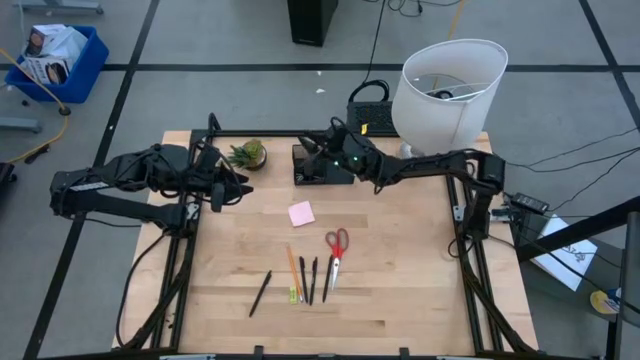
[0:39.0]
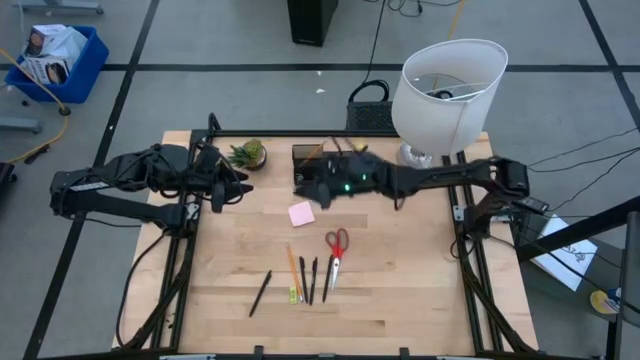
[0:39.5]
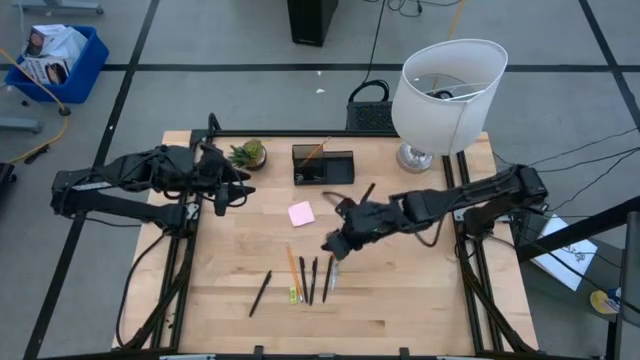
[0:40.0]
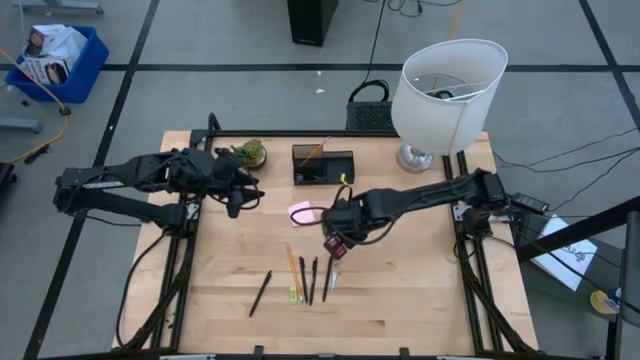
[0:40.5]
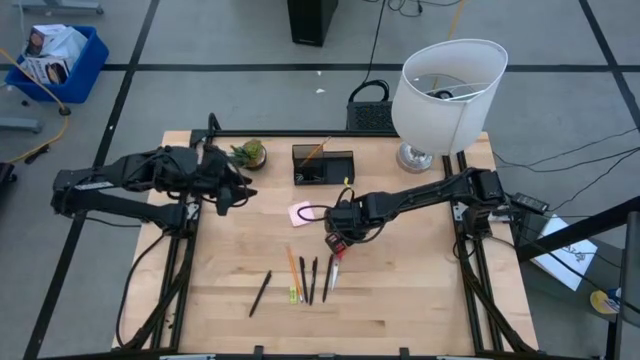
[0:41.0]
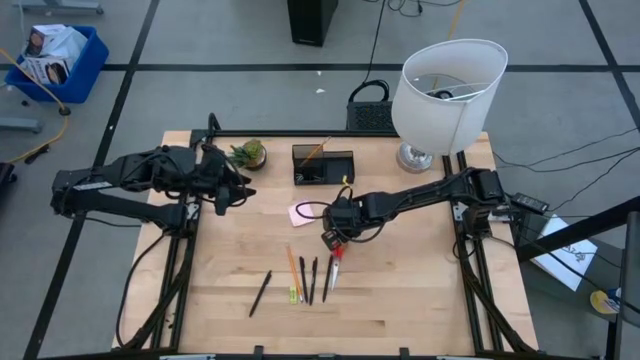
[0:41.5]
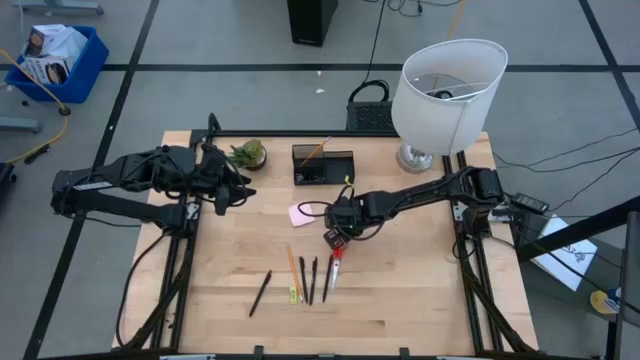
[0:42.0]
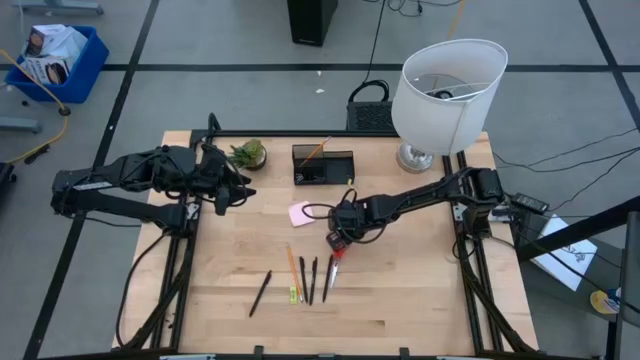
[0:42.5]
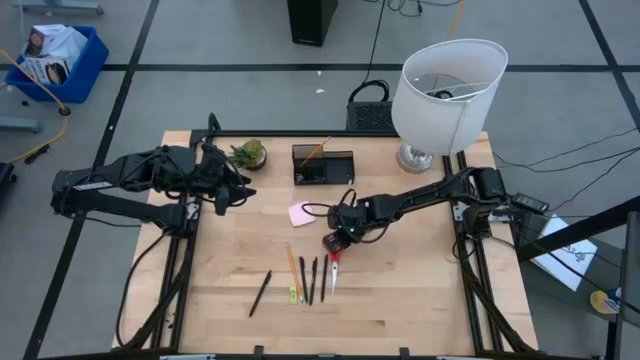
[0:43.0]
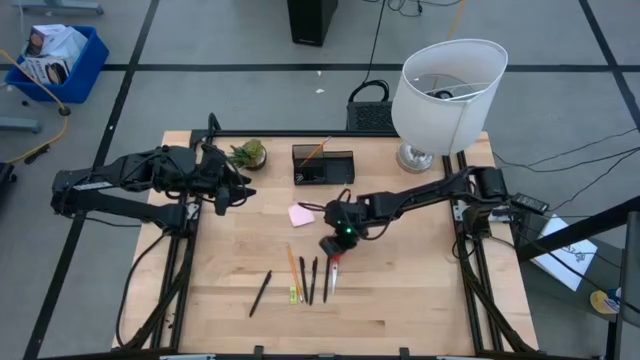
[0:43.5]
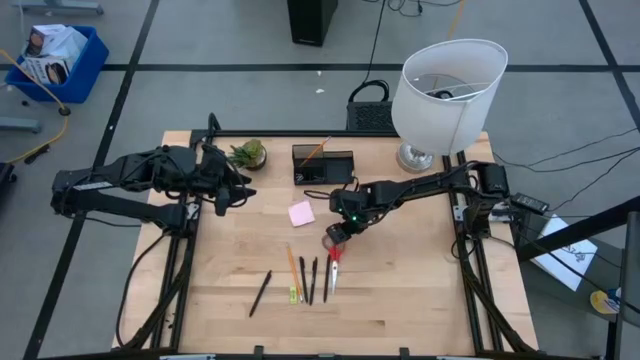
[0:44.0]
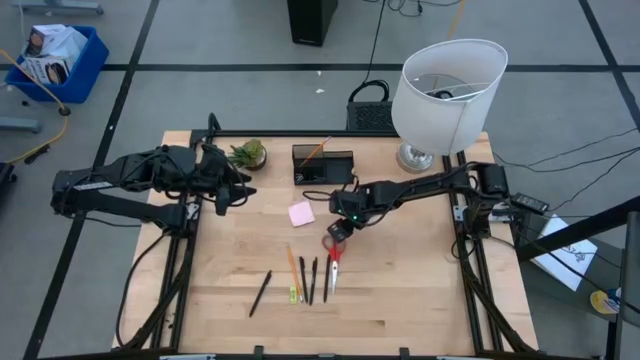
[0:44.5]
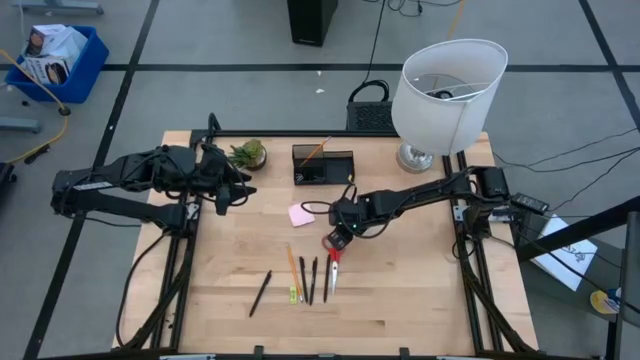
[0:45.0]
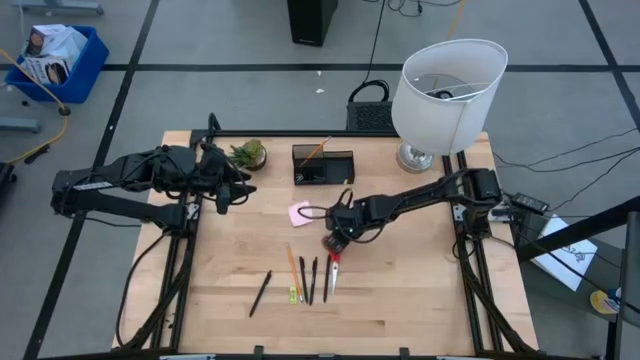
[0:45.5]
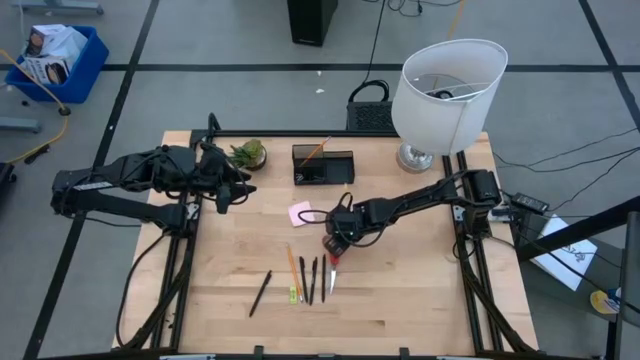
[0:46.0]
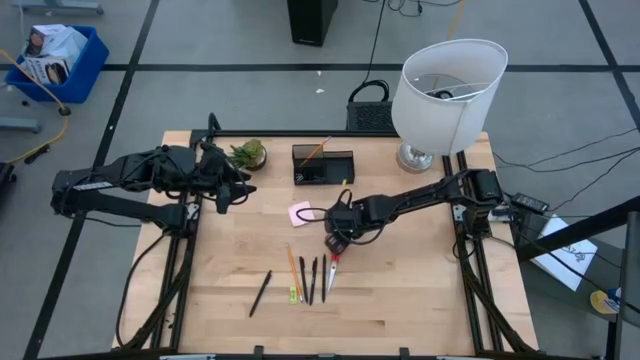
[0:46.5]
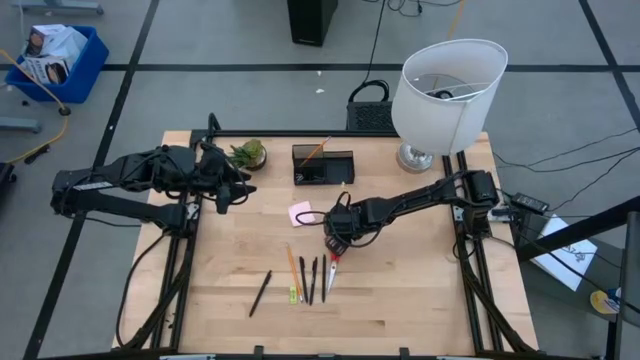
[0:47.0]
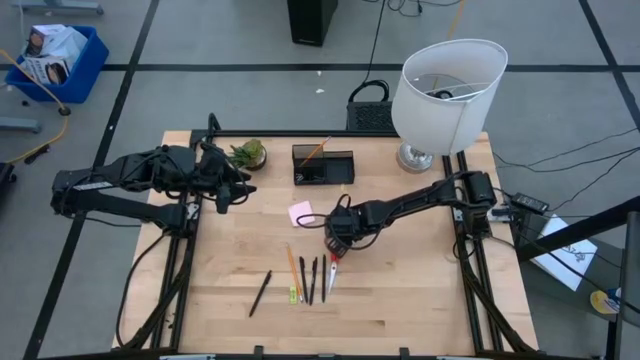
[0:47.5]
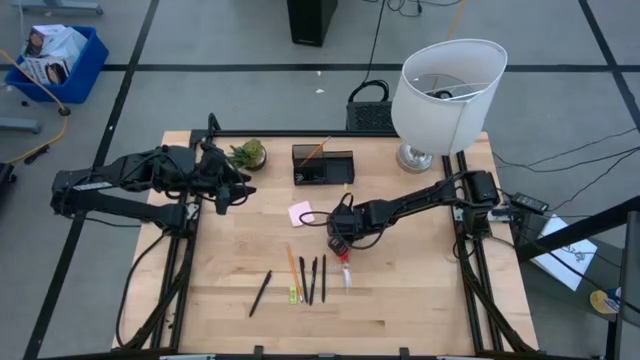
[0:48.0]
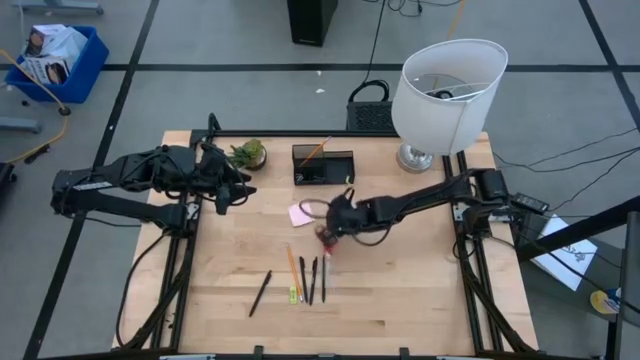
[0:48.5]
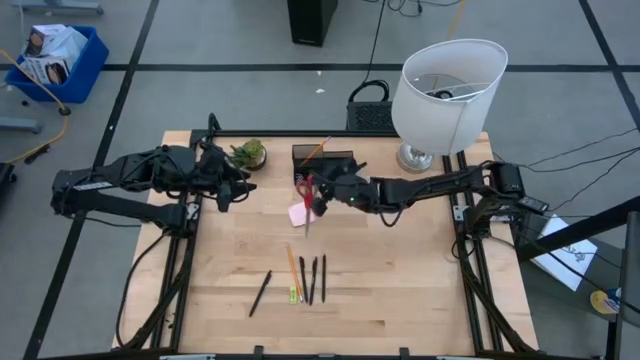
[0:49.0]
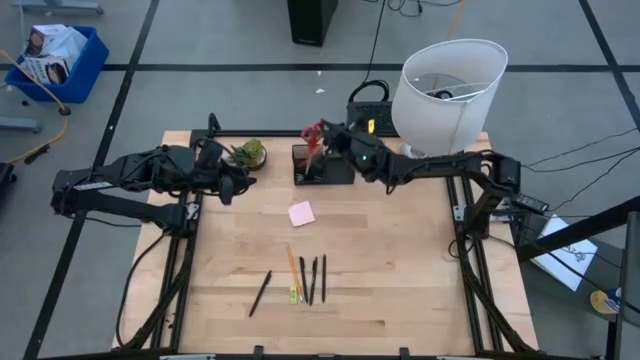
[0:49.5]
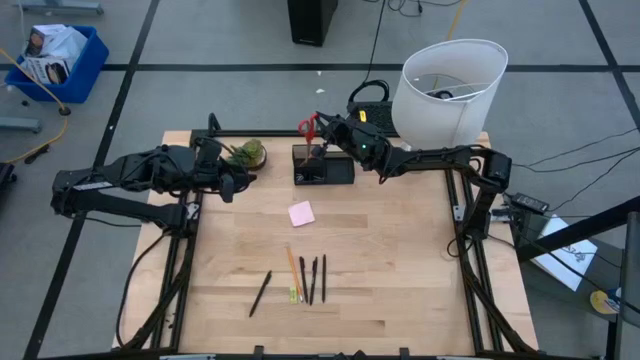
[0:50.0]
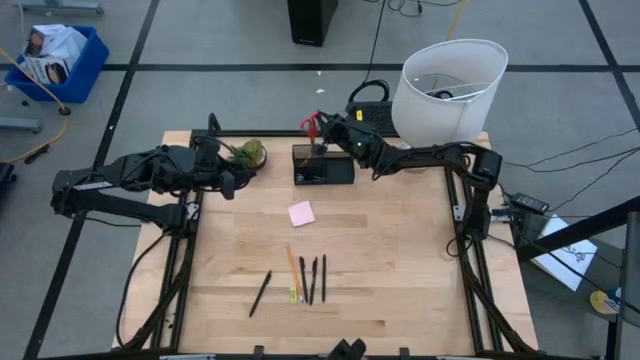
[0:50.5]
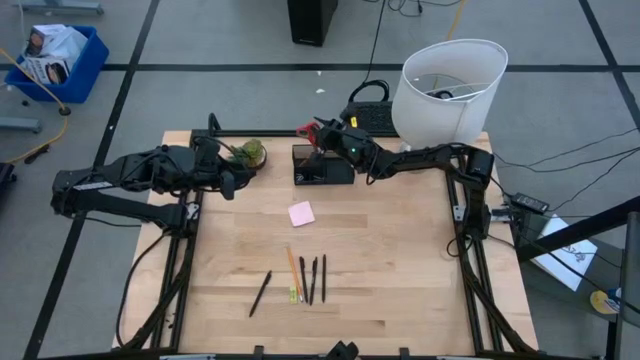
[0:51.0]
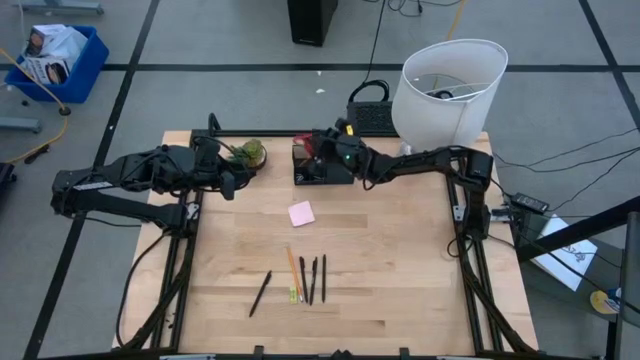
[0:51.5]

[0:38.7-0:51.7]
Task: Pick and place office supplies into organizer
Put the red scissors into the black desk organizer

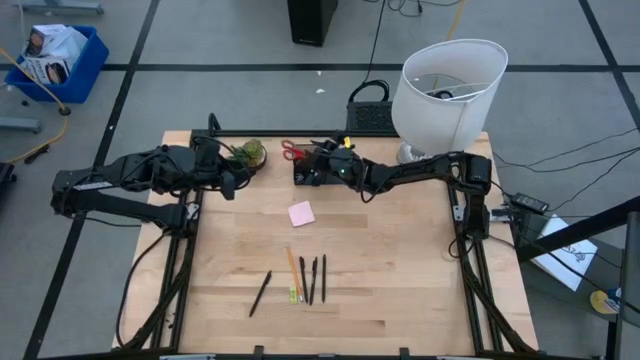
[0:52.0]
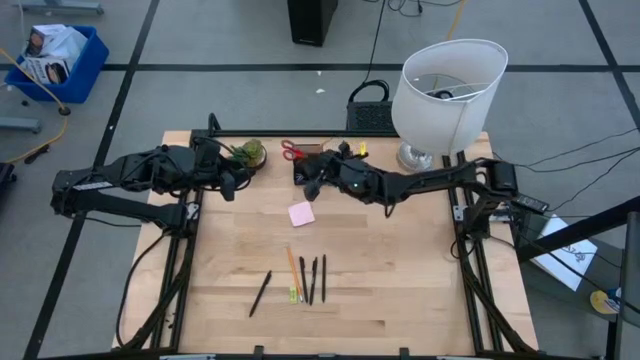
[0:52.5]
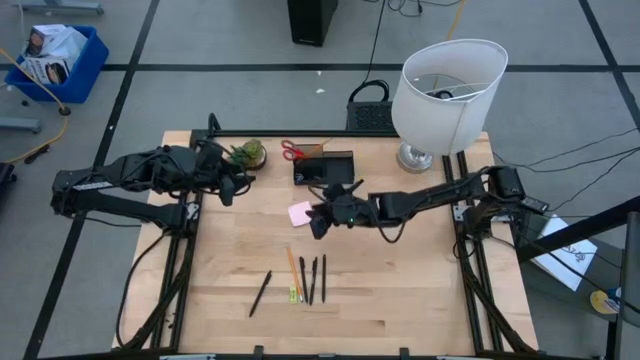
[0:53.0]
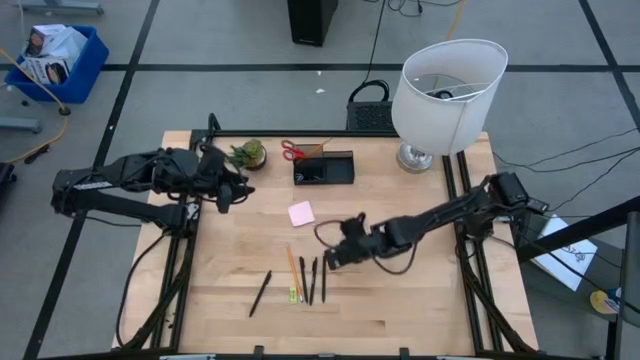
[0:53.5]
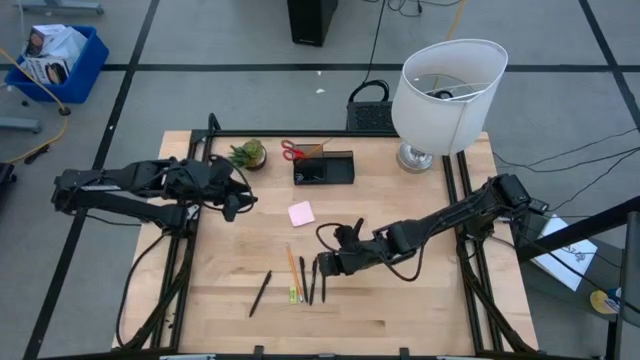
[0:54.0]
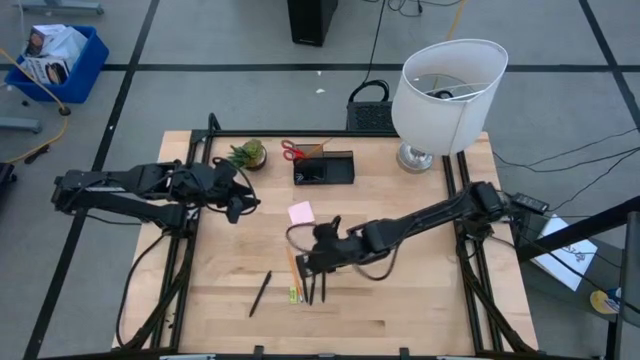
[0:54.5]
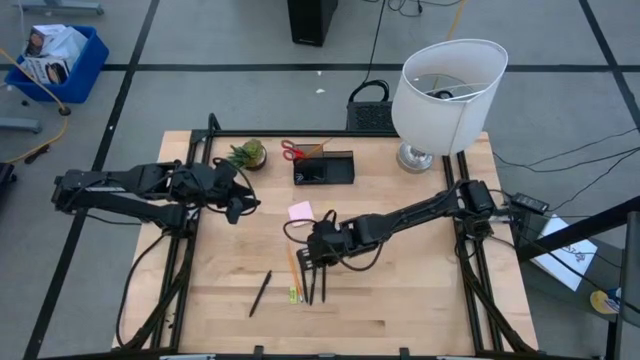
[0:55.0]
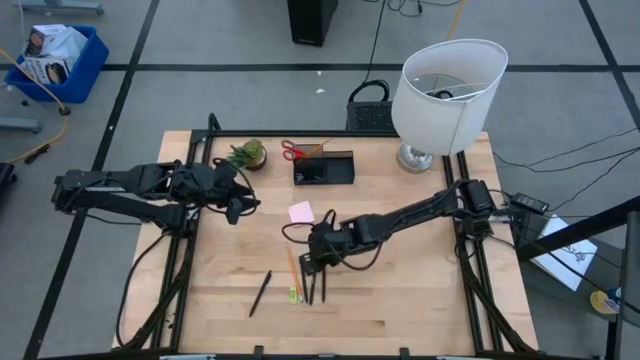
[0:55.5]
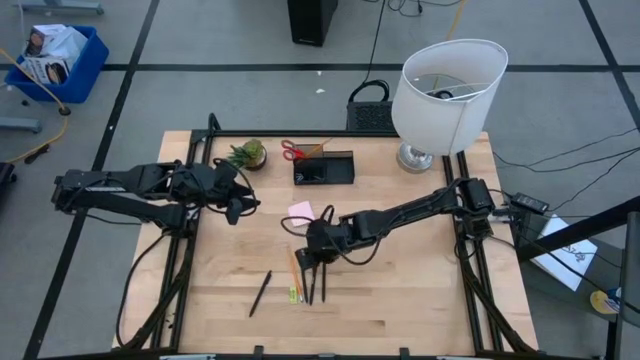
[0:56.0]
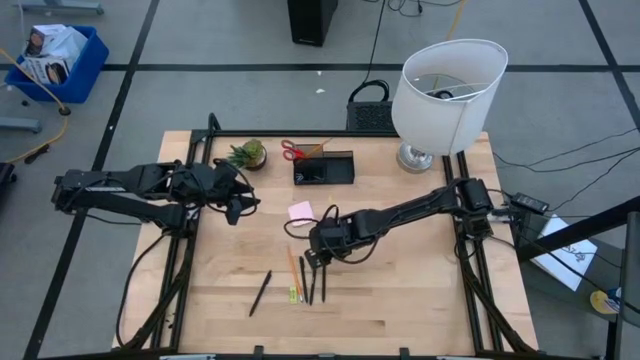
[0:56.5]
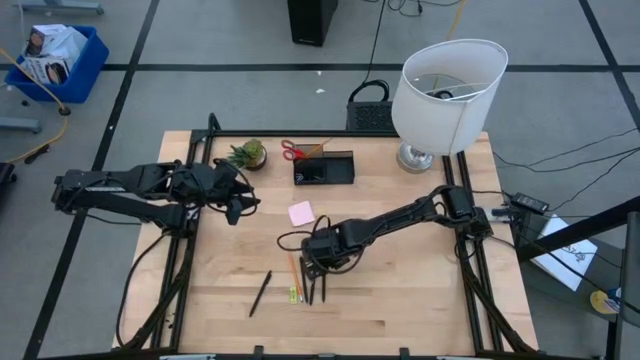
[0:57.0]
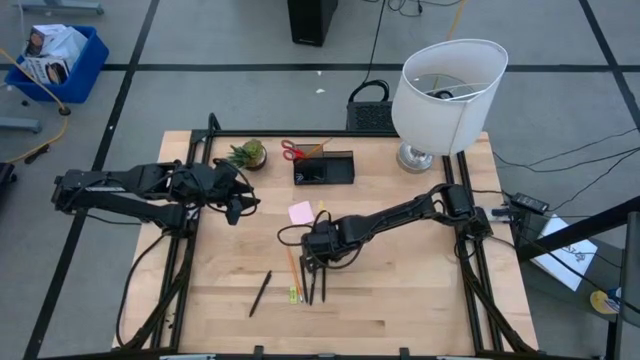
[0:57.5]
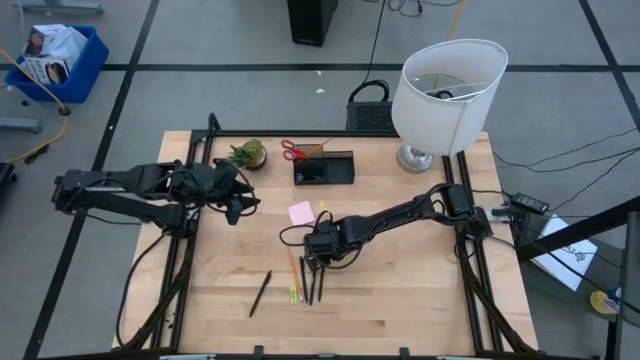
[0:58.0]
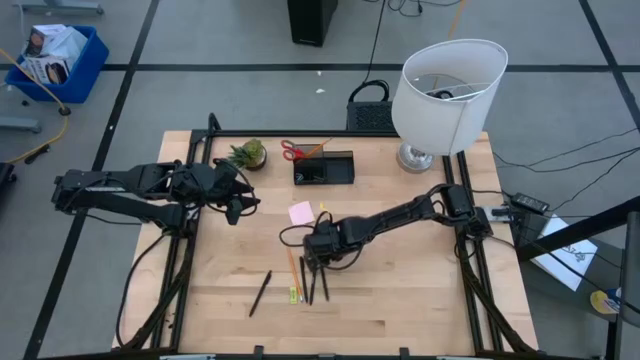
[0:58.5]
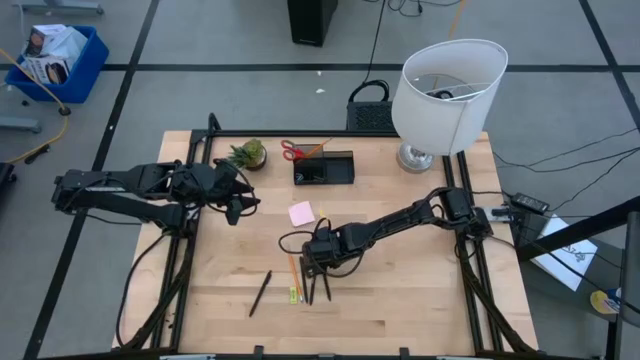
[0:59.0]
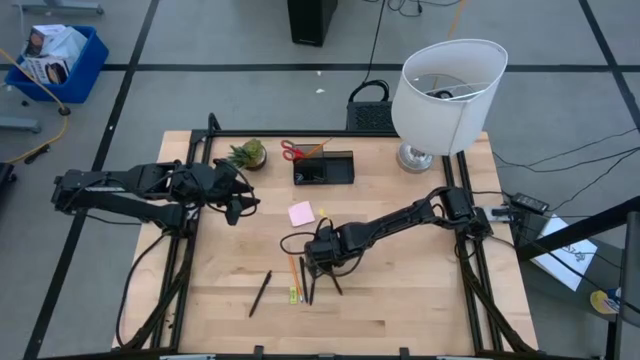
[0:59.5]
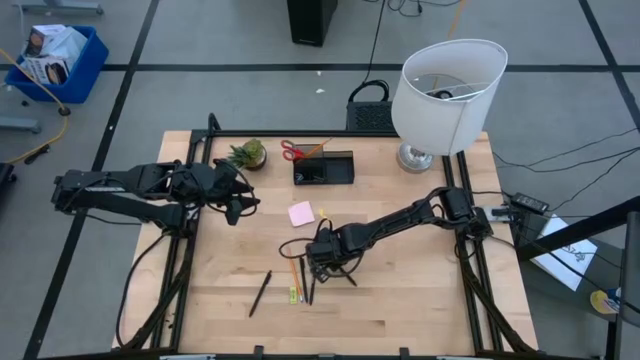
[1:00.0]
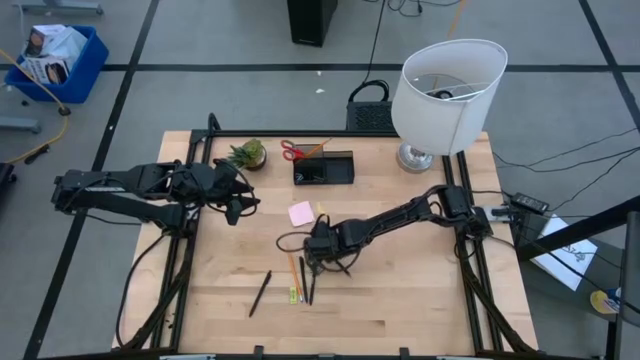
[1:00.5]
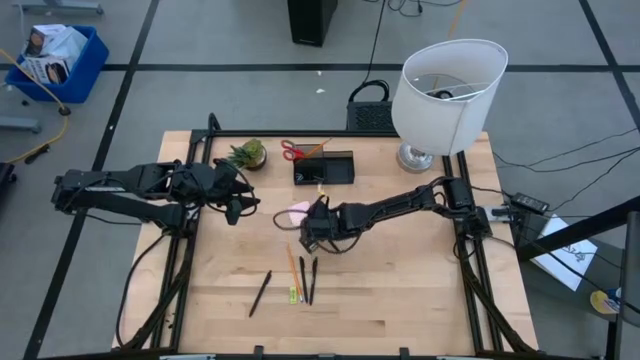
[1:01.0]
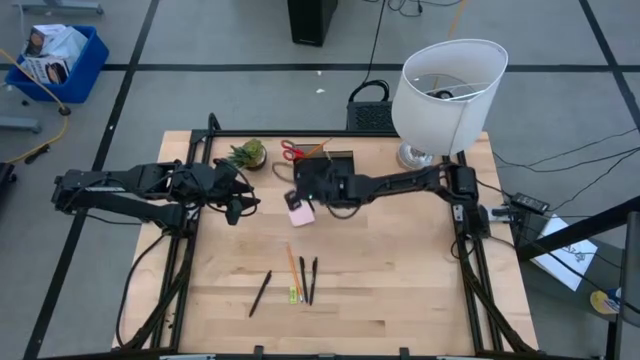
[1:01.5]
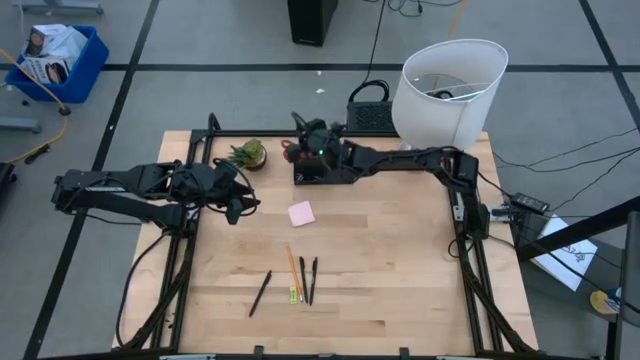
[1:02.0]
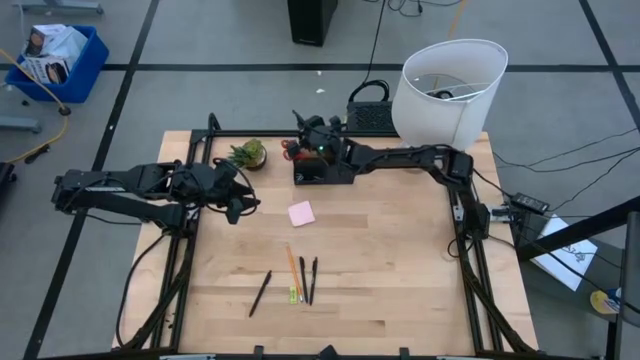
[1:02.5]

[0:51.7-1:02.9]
Put the black pen into the black desk organizer
